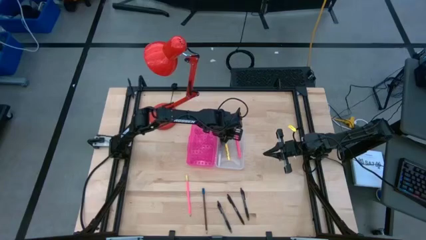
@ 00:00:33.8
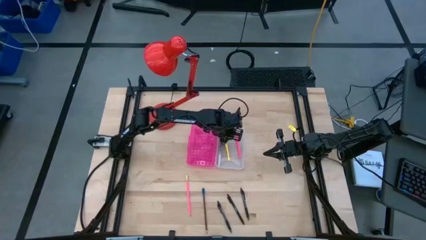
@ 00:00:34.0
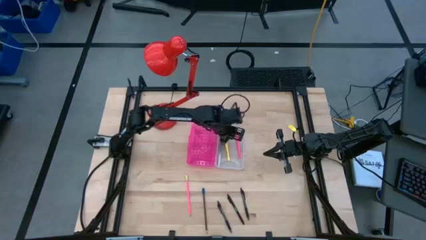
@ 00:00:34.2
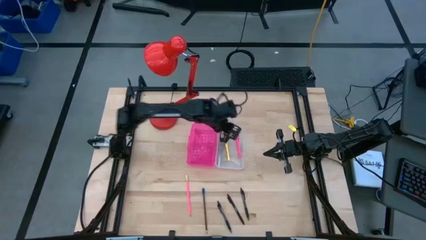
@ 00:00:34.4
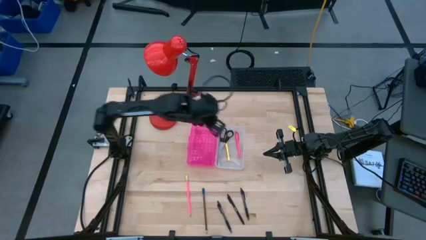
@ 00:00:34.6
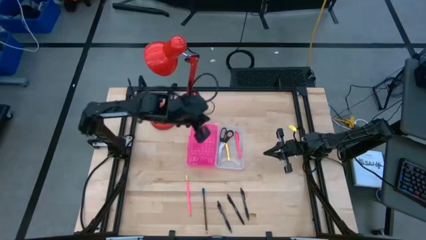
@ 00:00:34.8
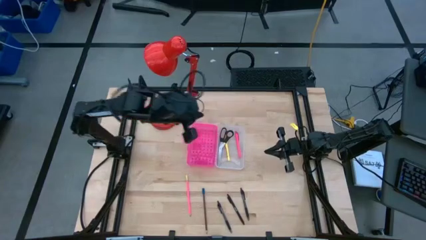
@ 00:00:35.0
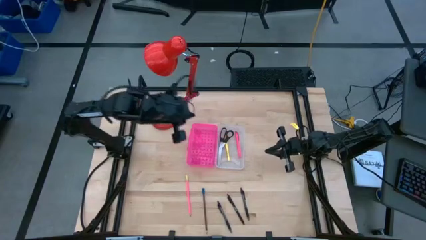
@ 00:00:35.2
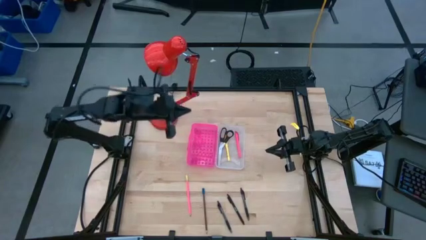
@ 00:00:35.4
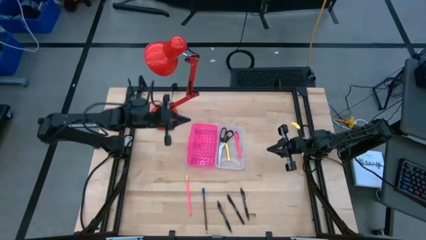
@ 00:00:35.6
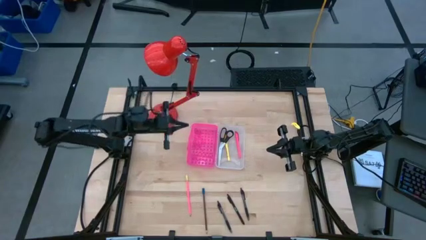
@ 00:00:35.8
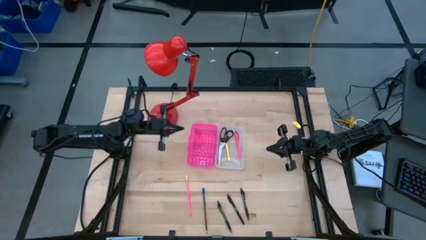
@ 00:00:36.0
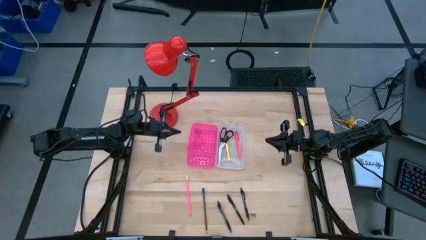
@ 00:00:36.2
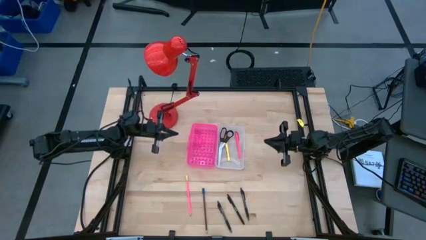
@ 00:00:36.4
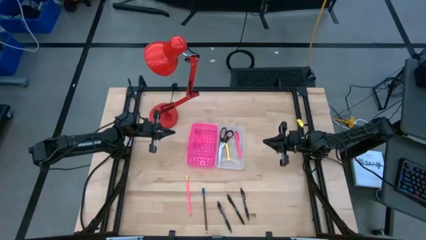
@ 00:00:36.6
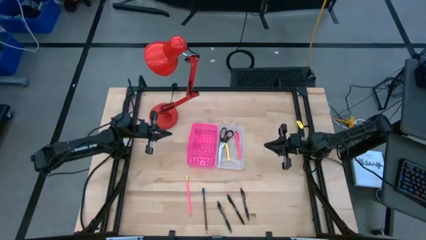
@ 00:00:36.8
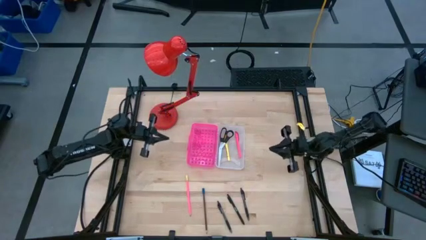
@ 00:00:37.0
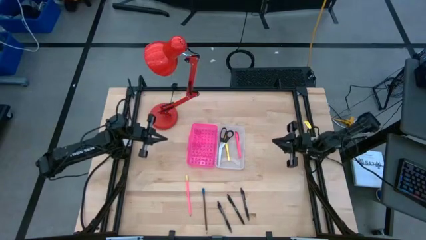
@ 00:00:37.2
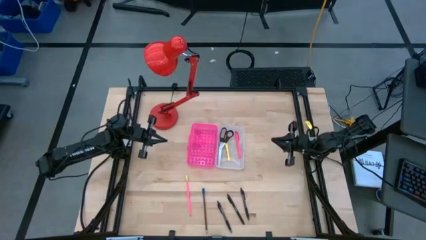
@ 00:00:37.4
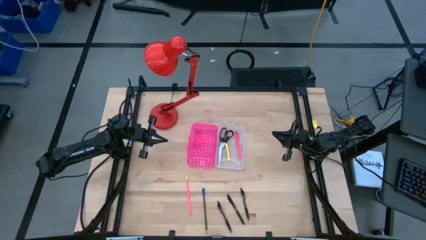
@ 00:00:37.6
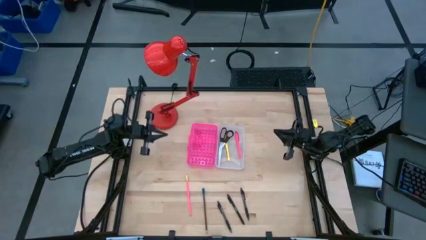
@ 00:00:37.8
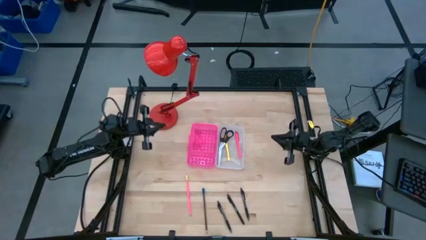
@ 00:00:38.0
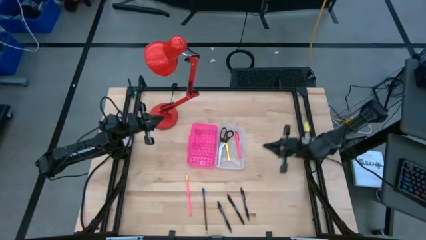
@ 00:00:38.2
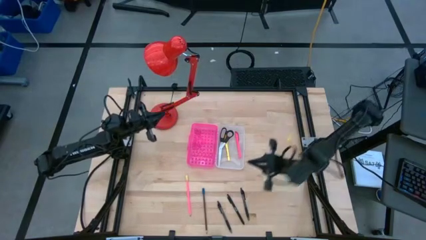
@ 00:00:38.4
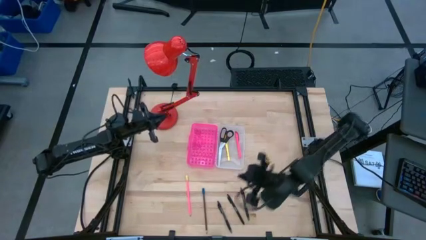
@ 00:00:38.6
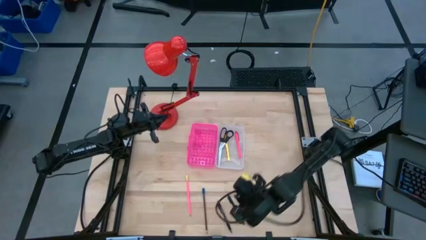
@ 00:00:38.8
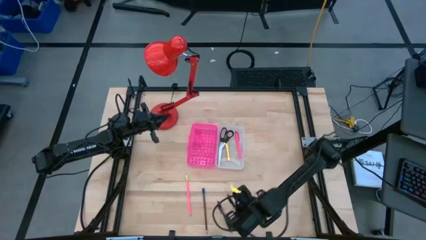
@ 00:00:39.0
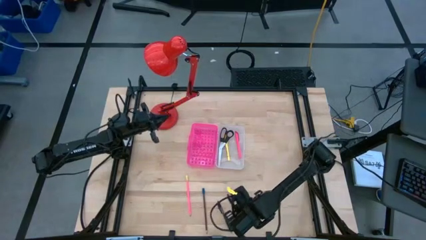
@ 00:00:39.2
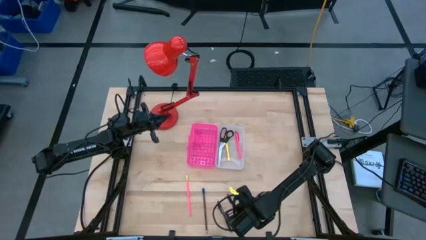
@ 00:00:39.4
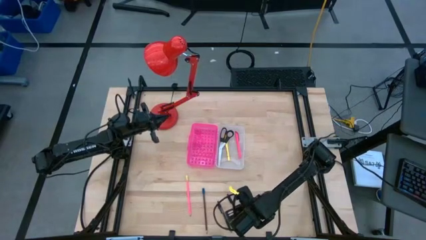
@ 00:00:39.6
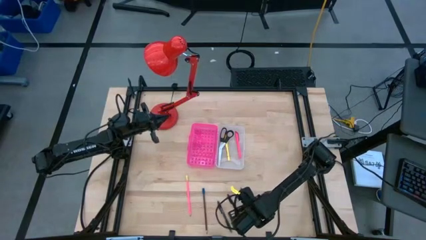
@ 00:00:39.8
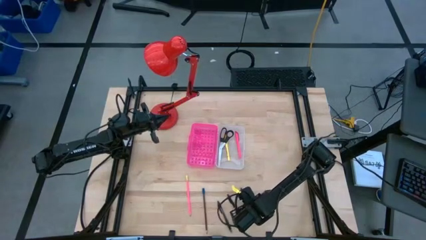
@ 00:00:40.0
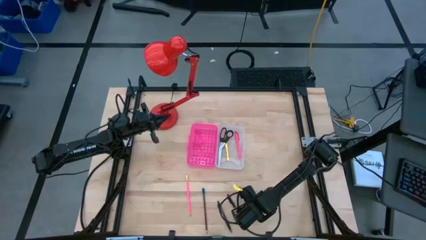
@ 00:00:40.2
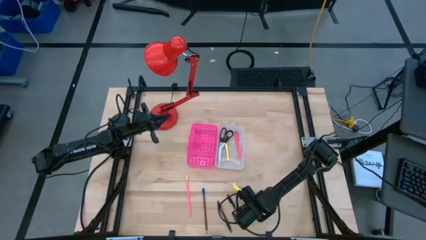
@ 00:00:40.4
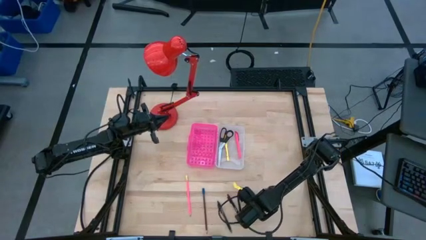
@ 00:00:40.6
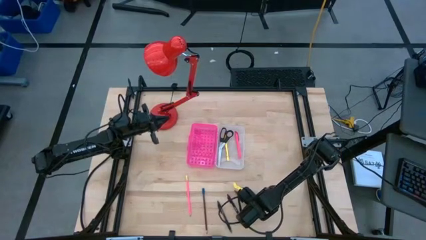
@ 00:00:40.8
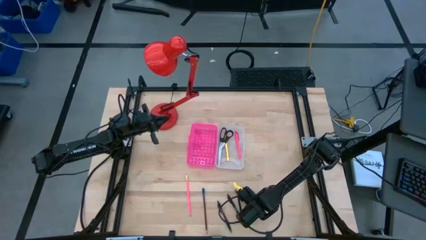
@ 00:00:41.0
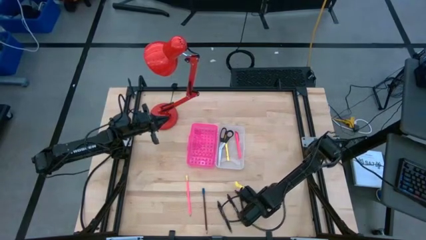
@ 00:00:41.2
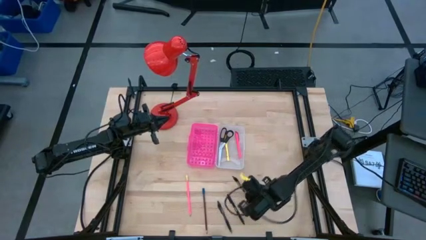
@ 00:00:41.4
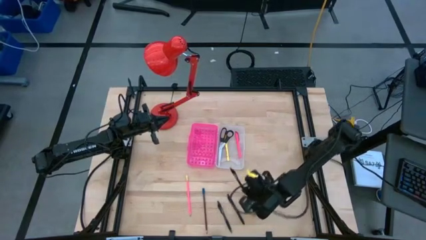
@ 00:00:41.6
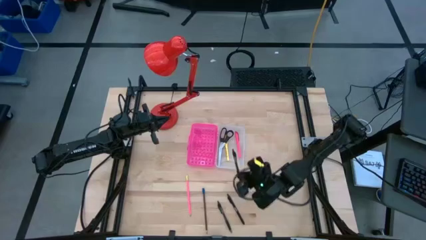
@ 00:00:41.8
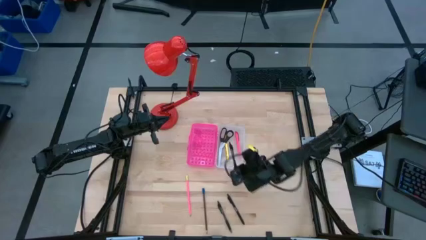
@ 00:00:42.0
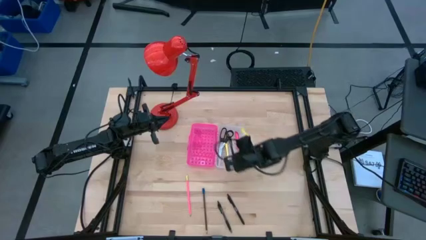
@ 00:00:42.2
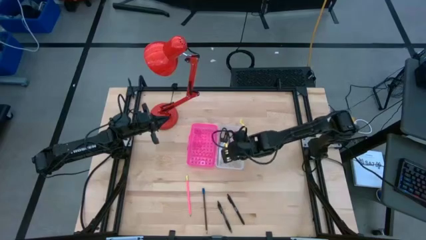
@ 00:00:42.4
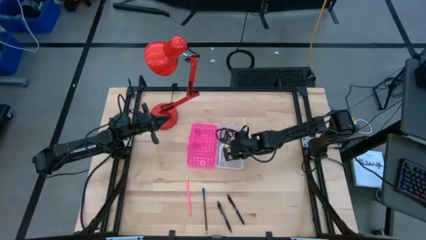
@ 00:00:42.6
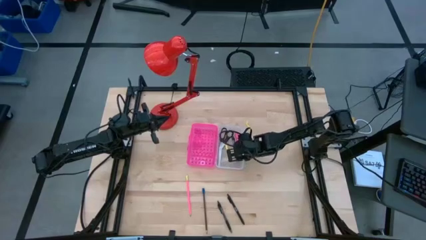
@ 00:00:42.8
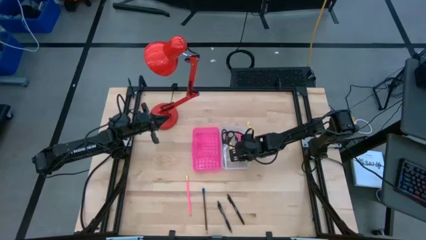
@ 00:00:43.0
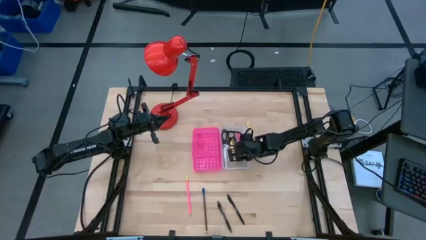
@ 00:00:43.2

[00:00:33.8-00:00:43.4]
Task: Pick & place school supplies into a supply box
Put the right black pen into the supply box

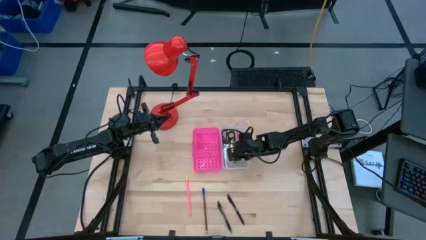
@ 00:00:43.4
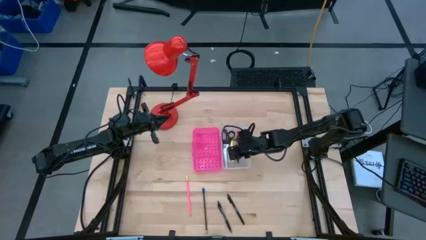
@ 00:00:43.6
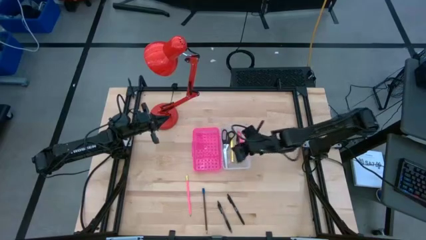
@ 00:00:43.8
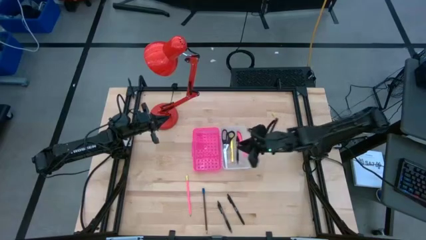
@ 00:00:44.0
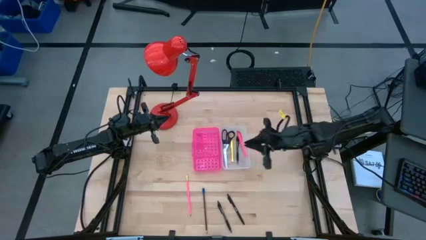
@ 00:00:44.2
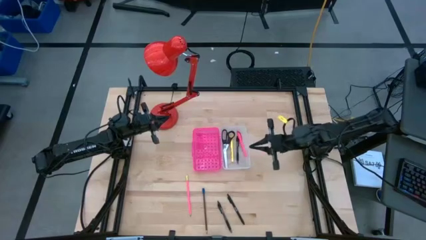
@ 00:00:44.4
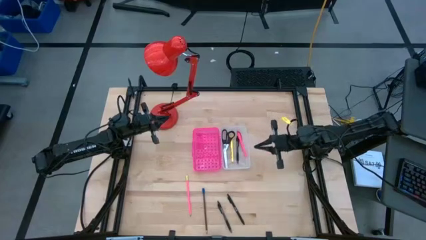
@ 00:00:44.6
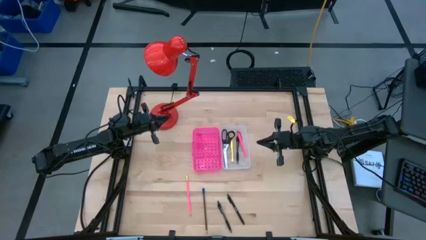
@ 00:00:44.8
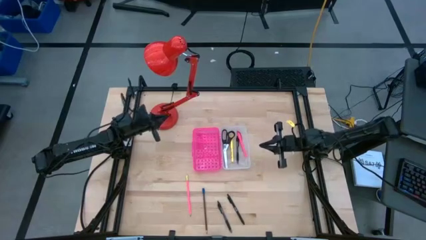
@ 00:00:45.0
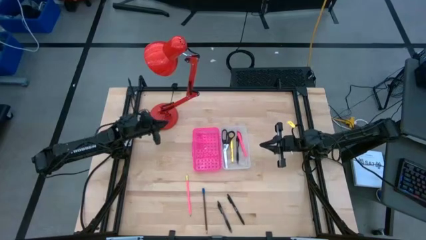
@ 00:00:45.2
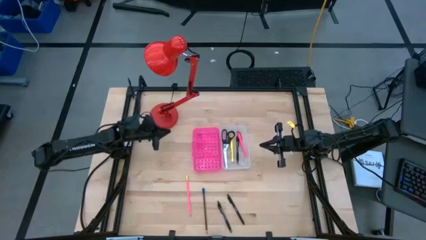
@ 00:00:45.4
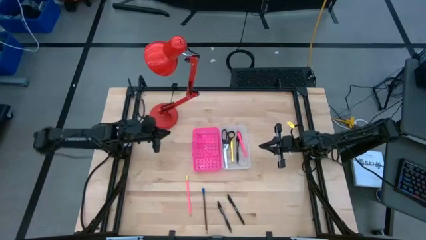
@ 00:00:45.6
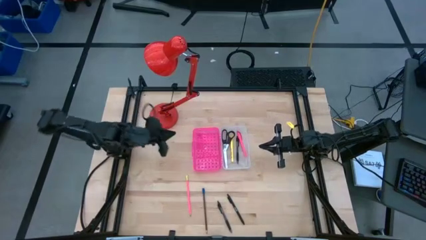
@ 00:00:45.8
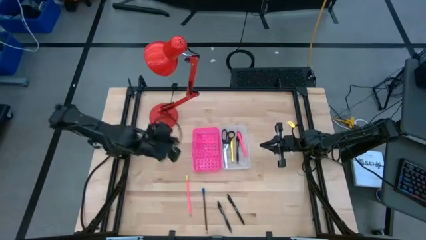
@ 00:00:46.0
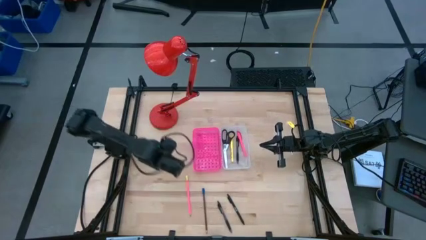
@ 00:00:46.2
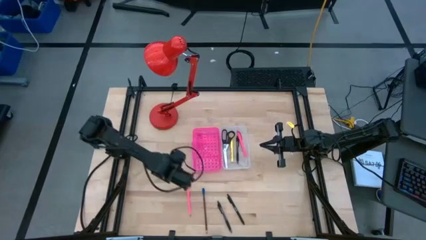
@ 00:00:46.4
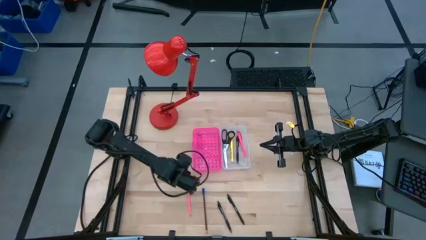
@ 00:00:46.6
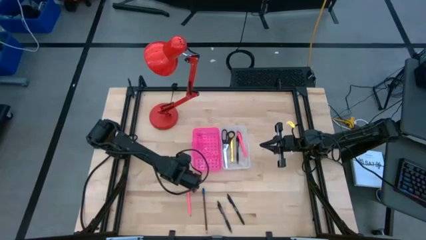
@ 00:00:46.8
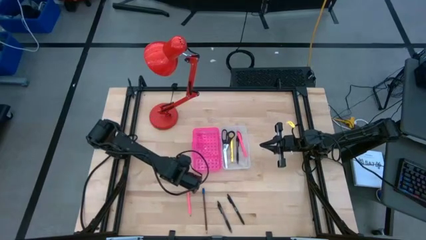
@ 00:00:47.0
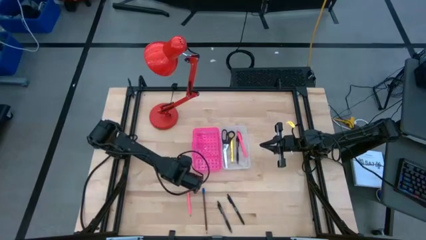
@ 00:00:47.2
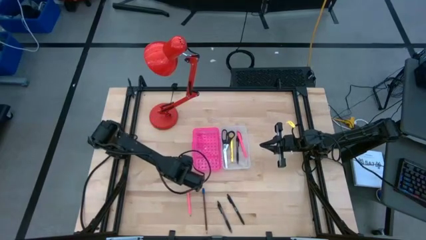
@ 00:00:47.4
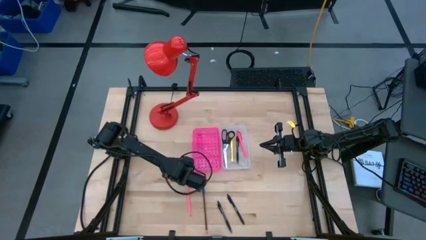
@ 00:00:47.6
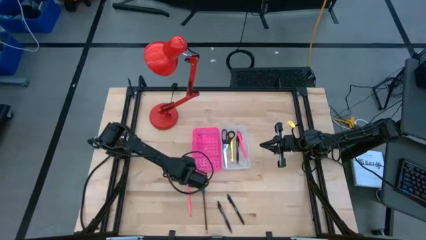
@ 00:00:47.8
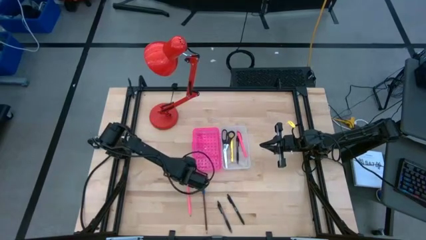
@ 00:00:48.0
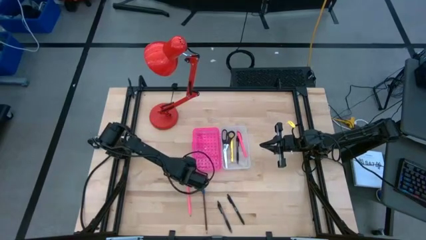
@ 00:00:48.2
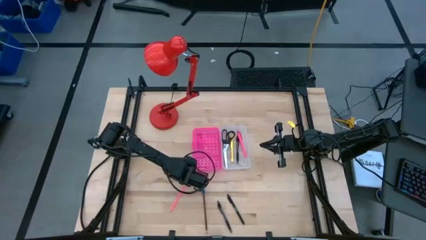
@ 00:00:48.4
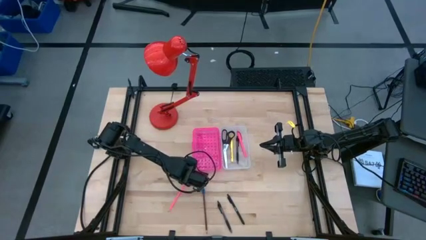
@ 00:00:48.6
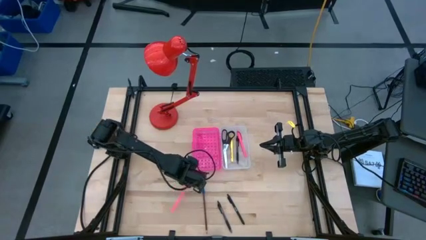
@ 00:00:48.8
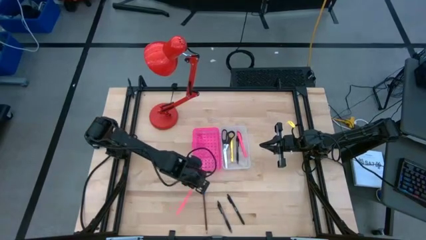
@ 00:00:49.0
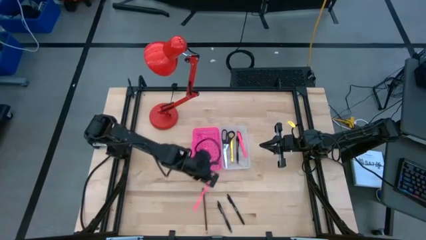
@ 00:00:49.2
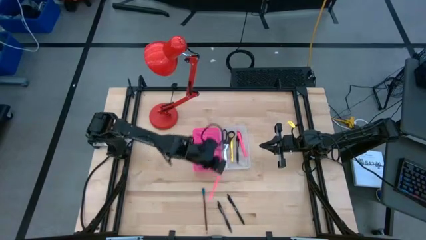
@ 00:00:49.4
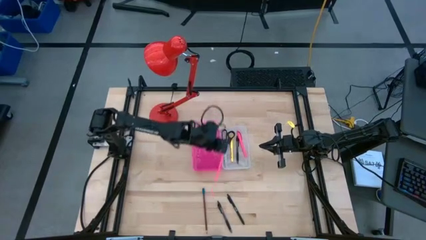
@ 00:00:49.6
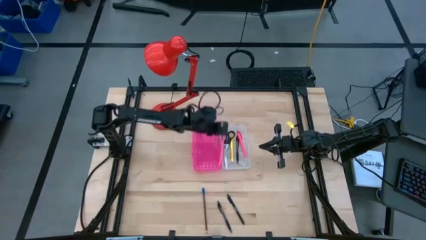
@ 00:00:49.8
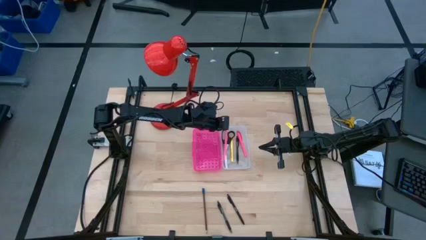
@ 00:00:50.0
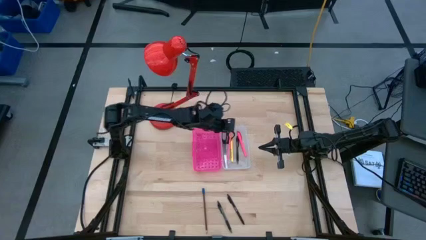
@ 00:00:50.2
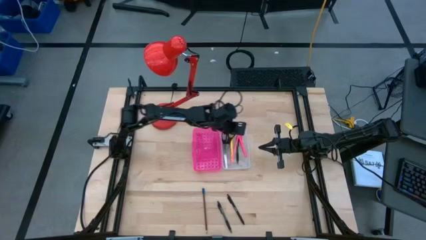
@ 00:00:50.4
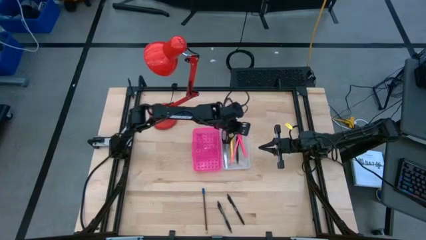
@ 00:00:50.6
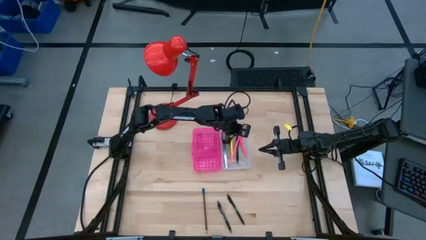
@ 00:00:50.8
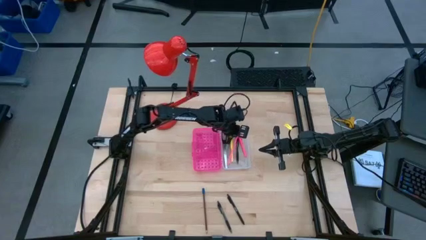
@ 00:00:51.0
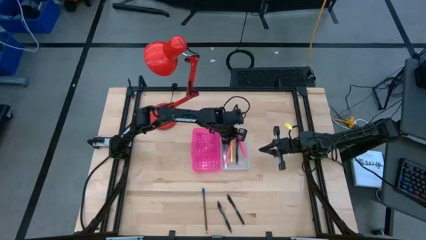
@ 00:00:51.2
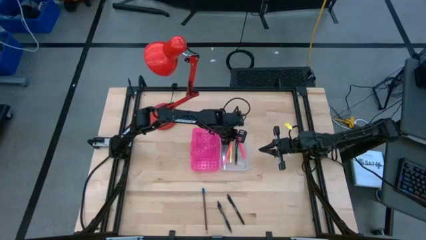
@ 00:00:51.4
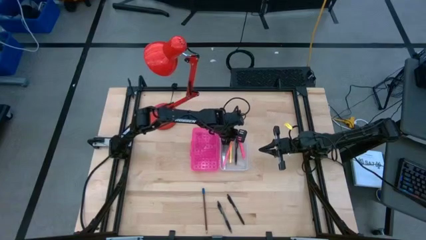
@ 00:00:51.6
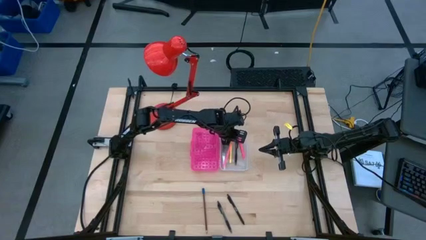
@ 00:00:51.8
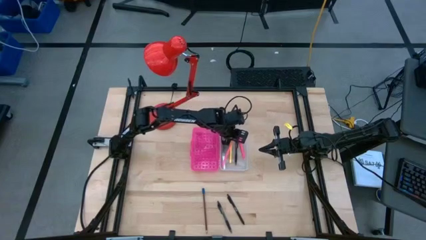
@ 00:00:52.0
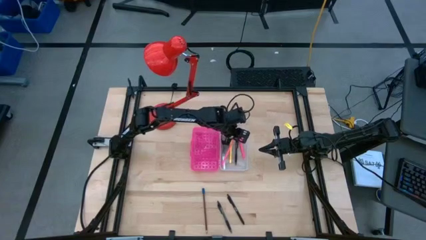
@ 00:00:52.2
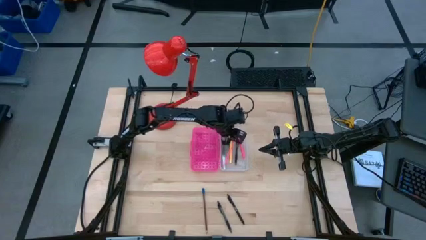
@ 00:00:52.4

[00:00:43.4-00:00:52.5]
Put the pink pencil into the supply box
